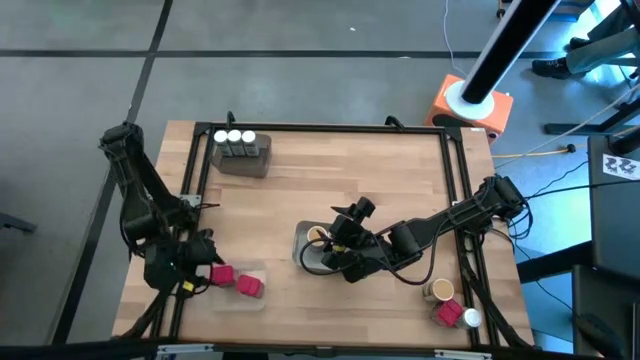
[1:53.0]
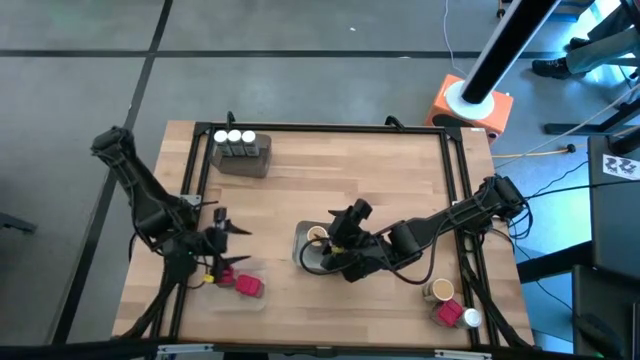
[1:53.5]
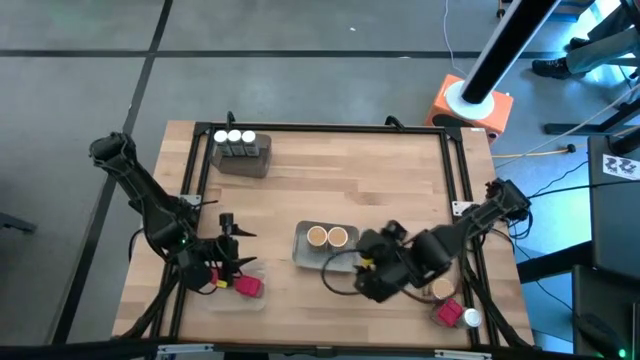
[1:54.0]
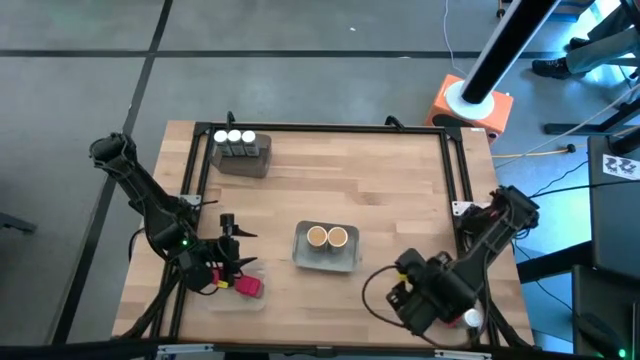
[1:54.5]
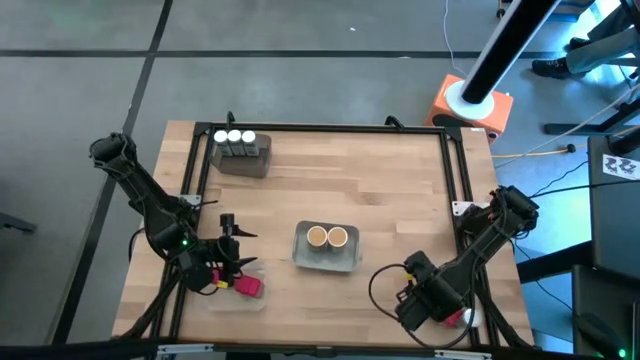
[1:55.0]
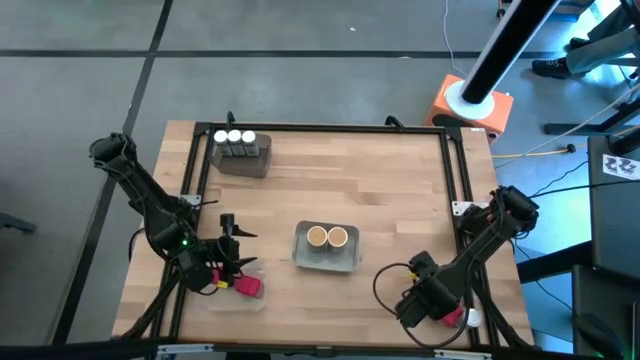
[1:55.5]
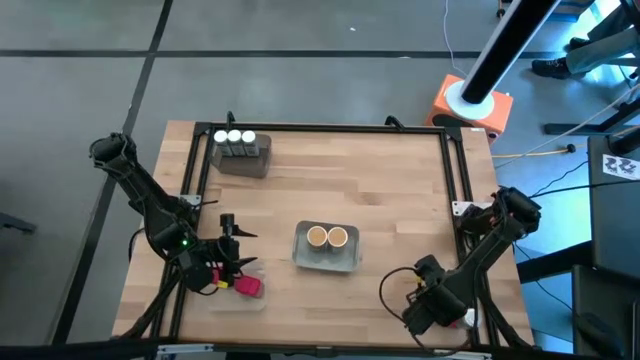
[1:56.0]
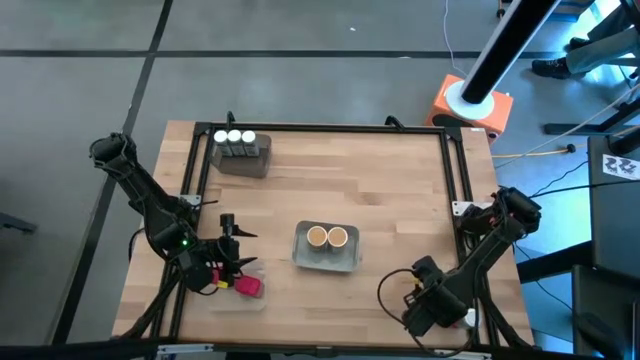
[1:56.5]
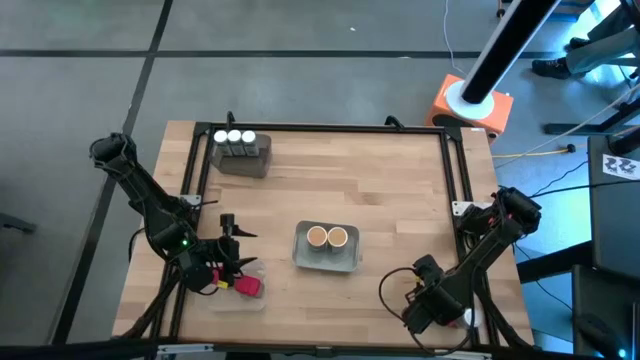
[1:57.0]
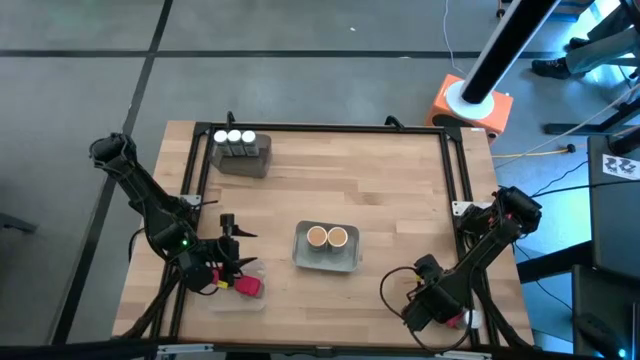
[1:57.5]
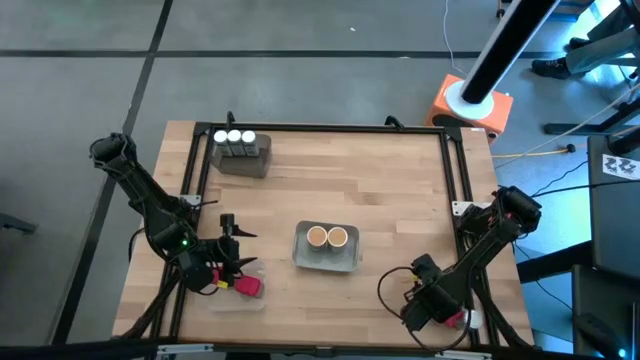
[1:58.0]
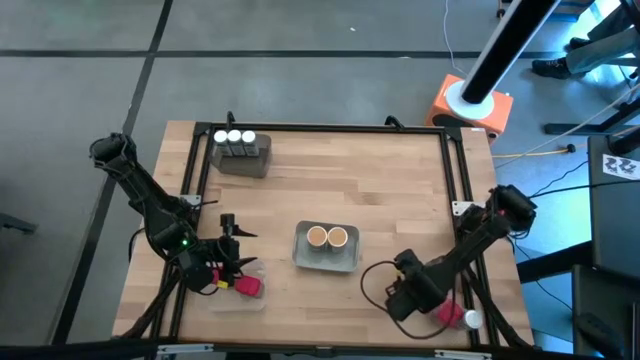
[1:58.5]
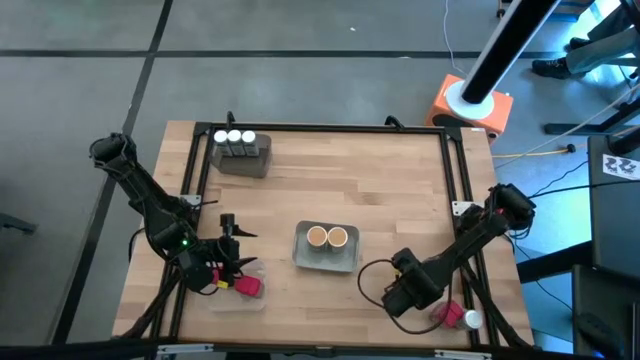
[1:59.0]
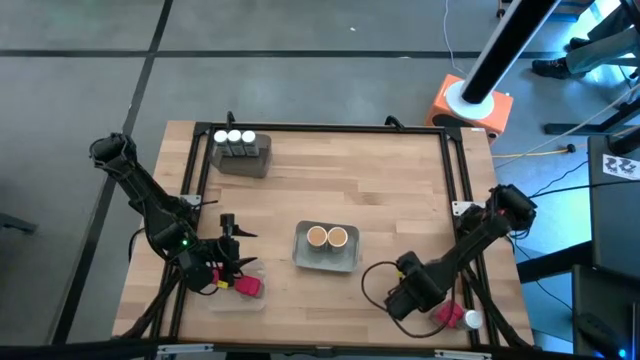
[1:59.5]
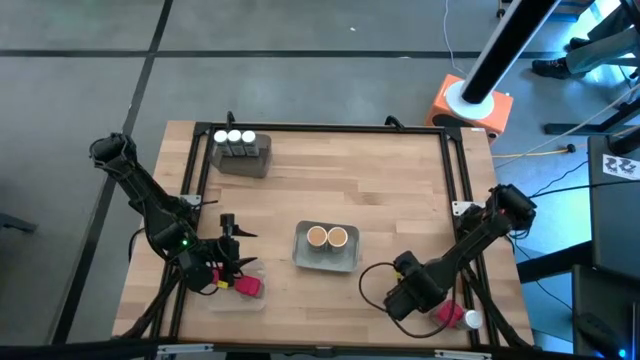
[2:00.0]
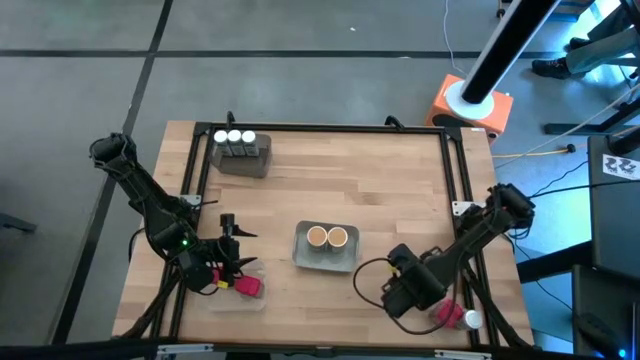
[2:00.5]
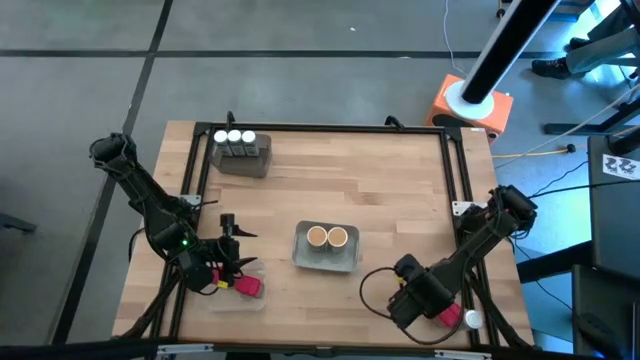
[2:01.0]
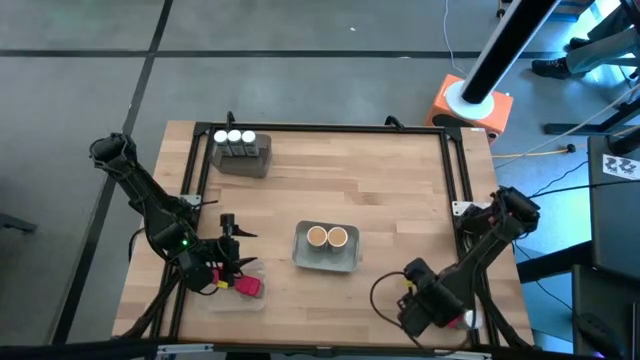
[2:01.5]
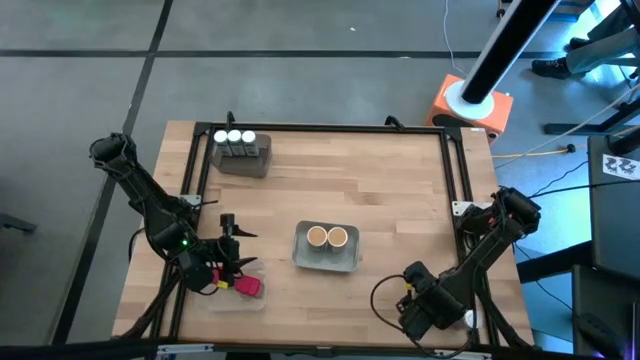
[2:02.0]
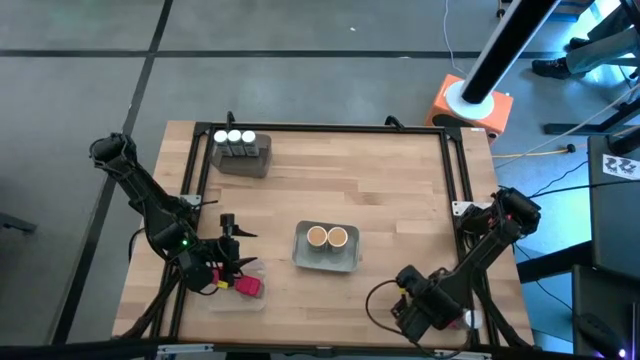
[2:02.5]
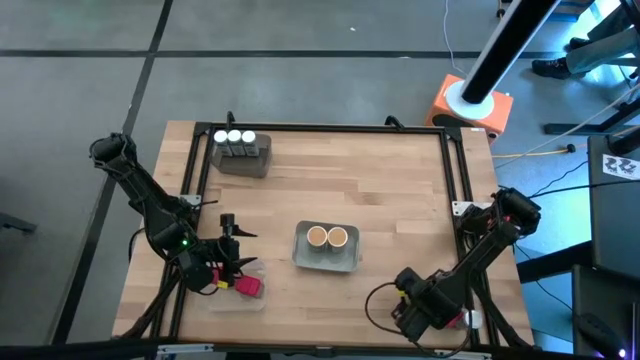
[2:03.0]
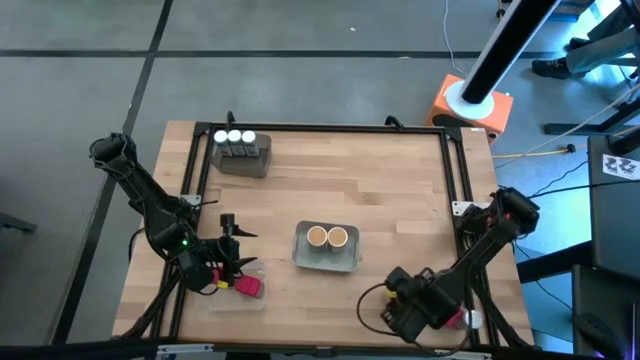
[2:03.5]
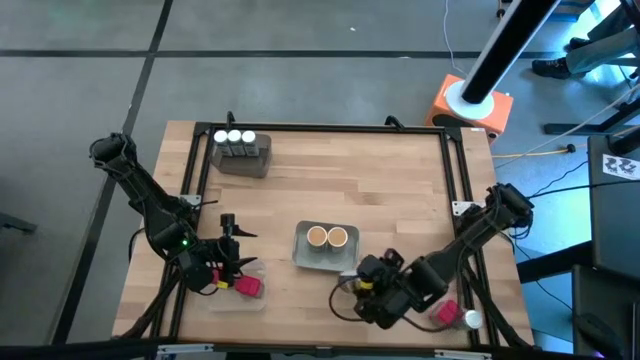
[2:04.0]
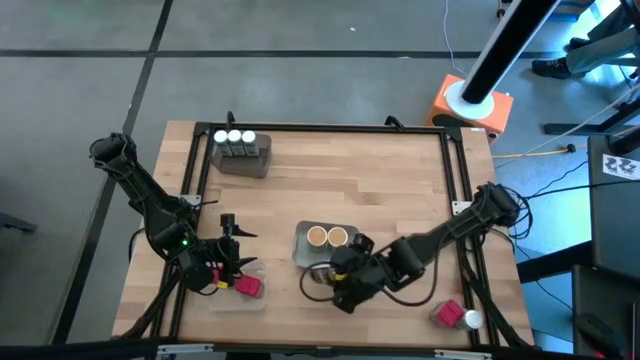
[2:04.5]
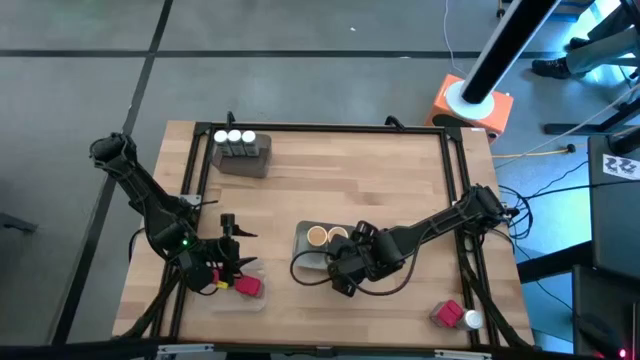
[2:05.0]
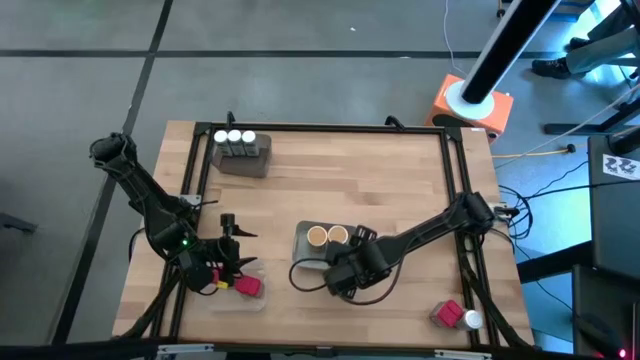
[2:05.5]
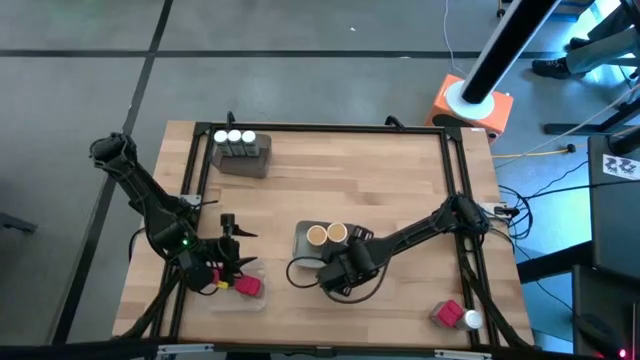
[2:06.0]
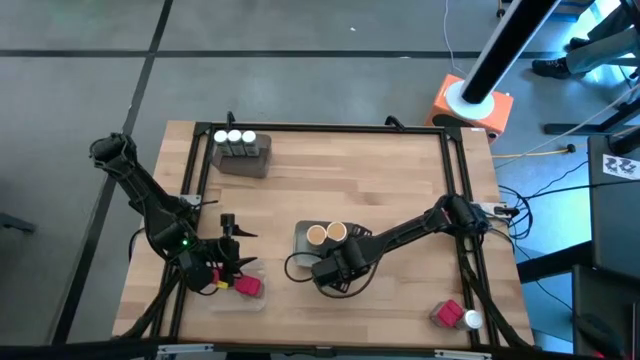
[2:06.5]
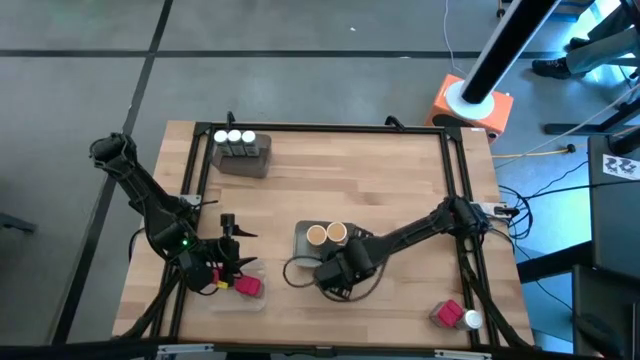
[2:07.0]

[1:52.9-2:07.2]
Task: Sort spices by type
Put the gold seasoning bottle into the gray bin

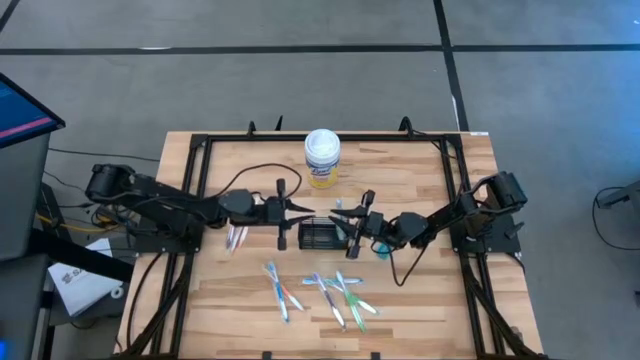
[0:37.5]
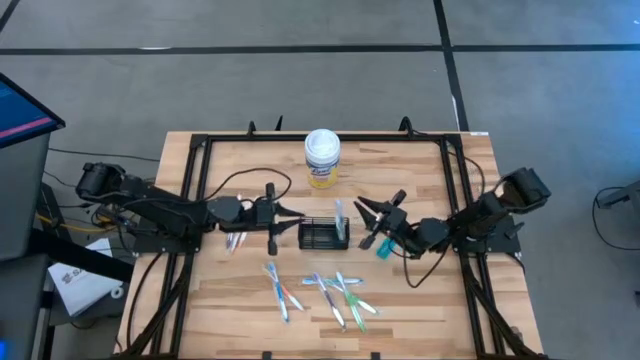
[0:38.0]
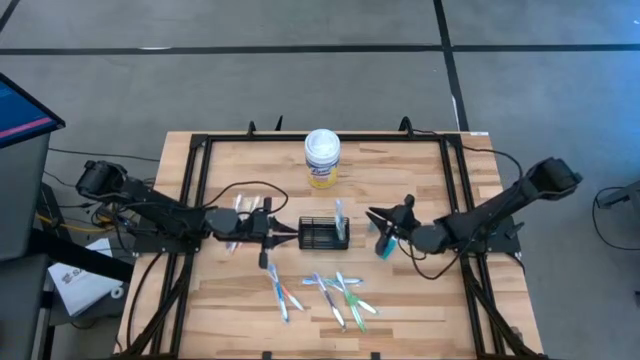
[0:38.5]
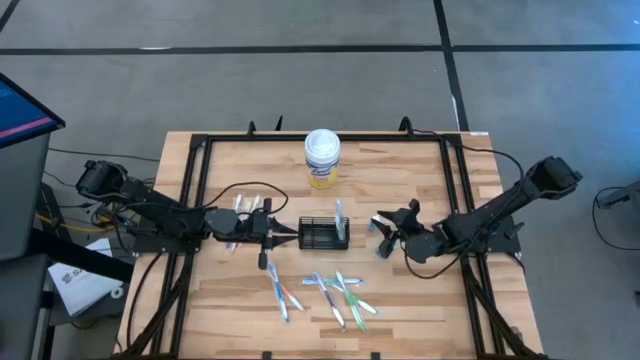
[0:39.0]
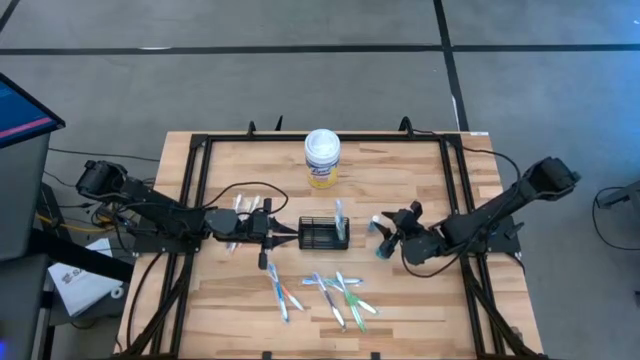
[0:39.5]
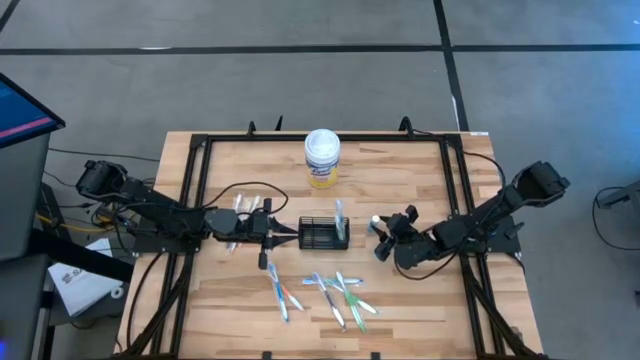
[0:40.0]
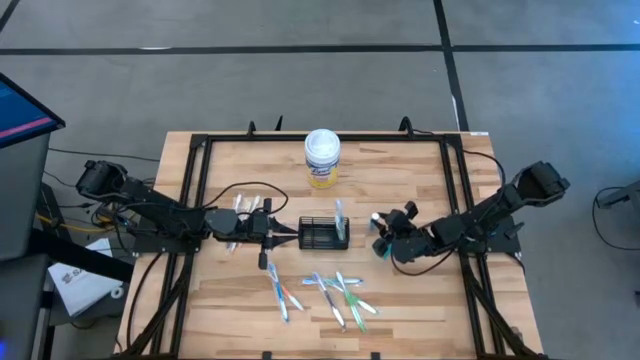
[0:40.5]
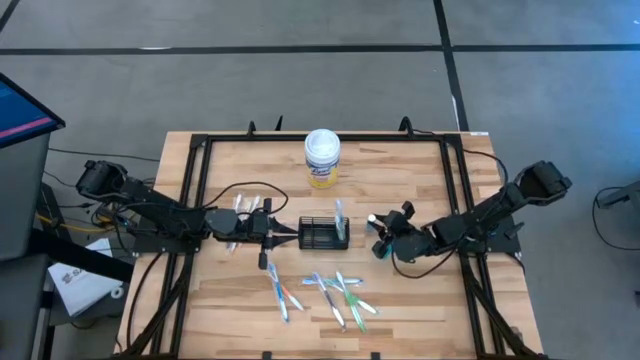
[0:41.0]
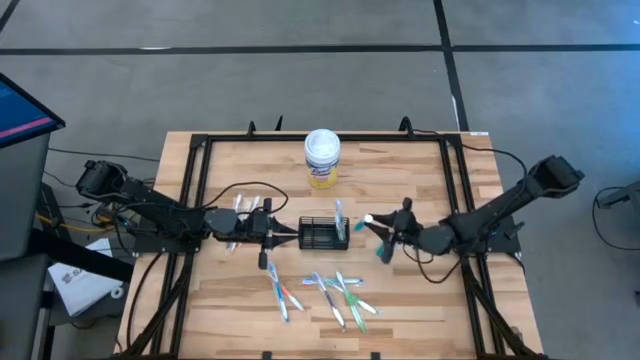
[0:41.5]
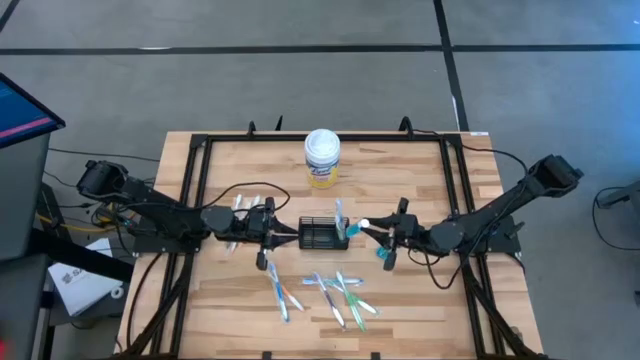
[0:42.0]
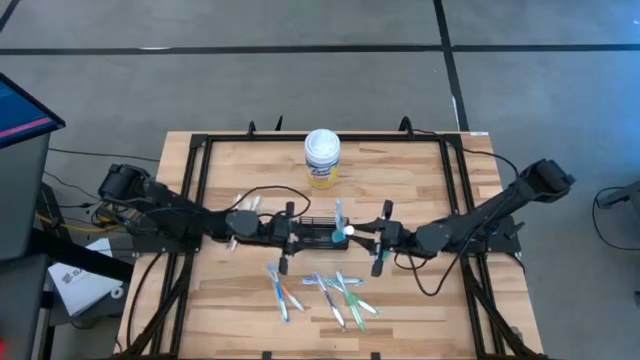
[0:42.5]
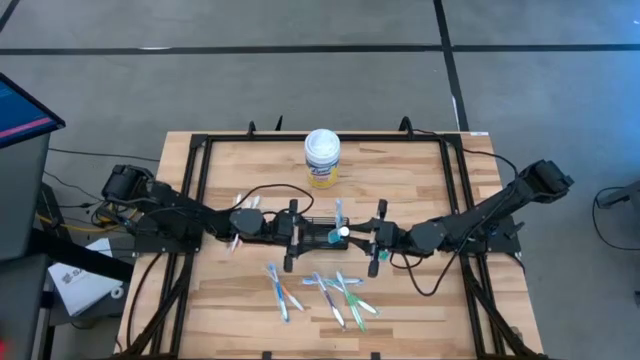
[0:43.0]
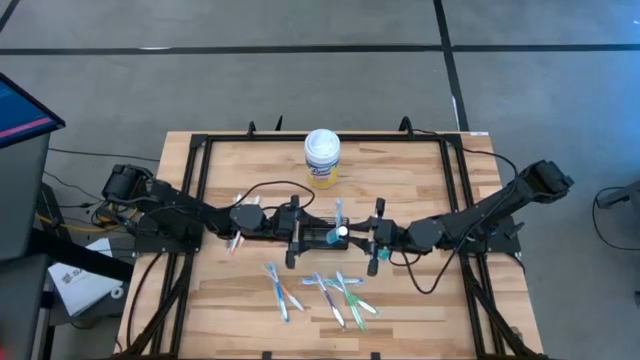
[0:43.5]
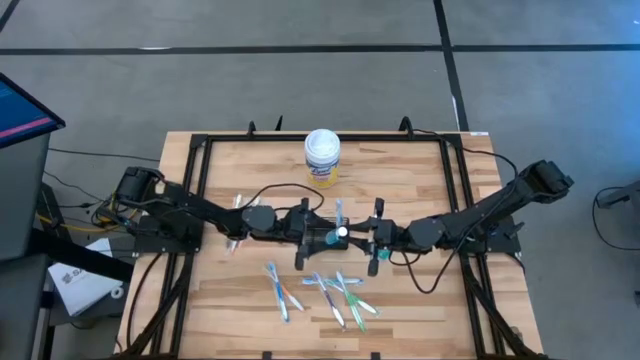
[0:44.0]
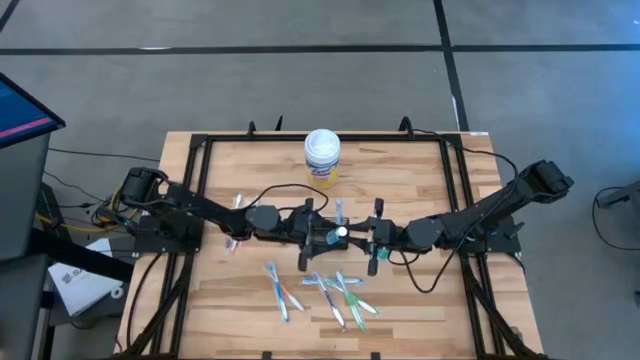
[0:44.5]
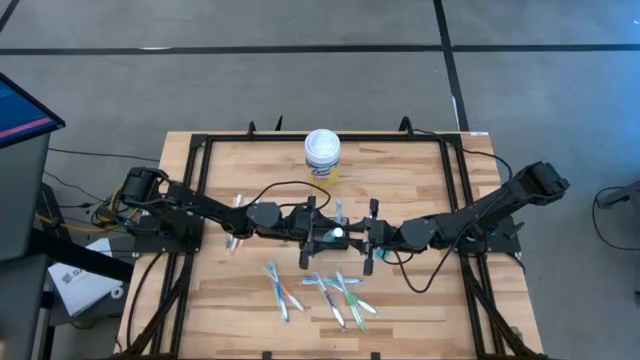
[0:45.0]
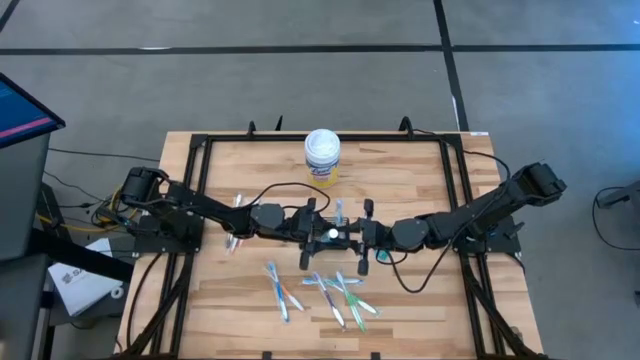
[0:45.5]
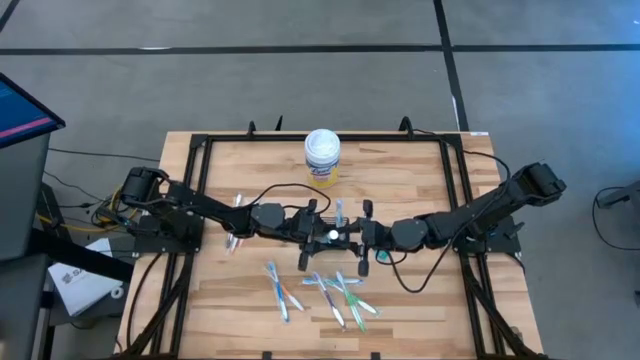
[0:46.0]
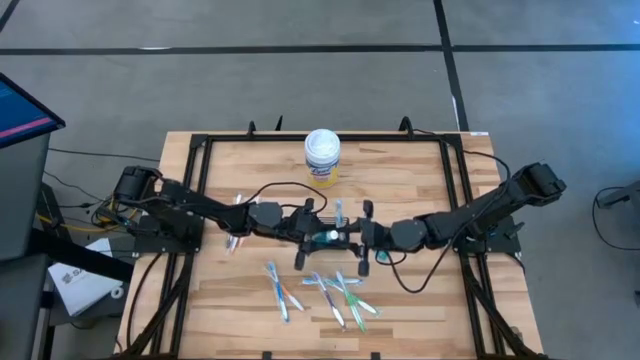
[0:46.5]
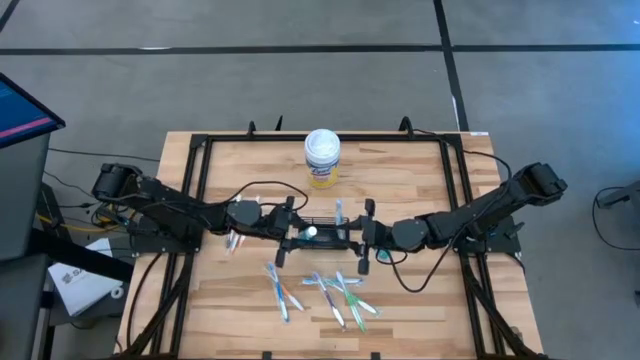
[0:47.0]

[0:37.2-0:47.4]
Task: Pick & Place toothbrushing station
Put the top blue mouthwash into the black mesh organizer
